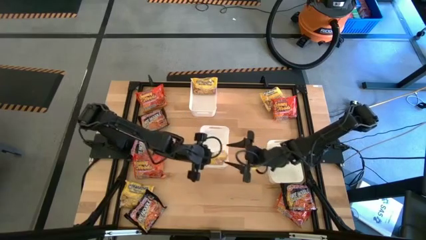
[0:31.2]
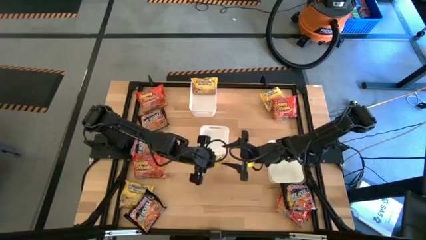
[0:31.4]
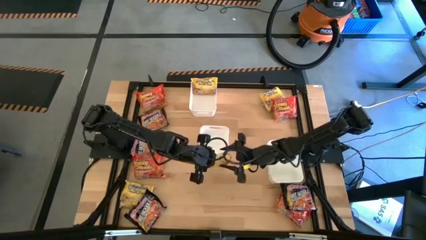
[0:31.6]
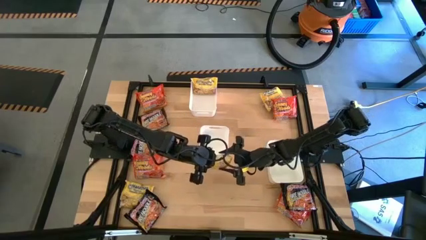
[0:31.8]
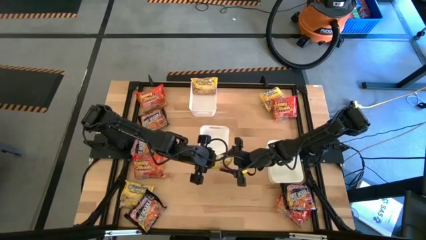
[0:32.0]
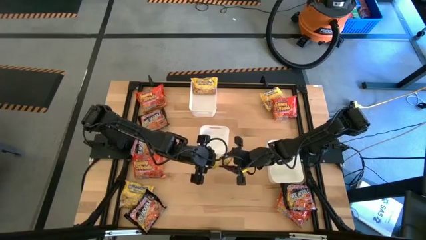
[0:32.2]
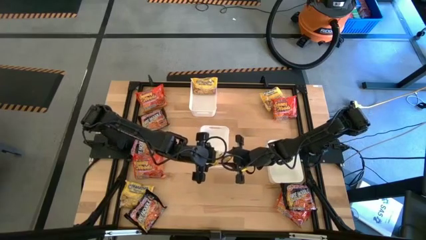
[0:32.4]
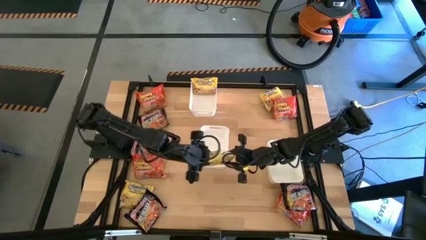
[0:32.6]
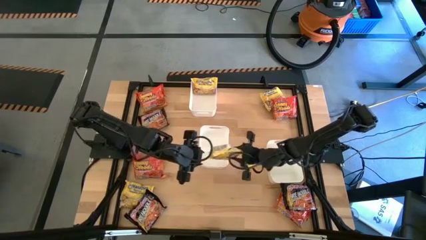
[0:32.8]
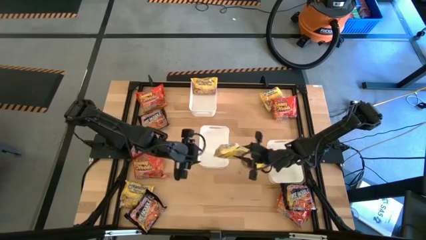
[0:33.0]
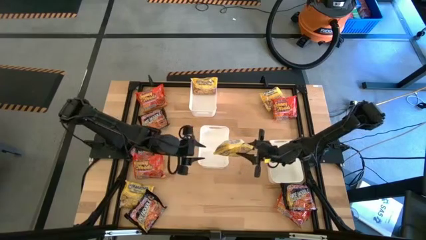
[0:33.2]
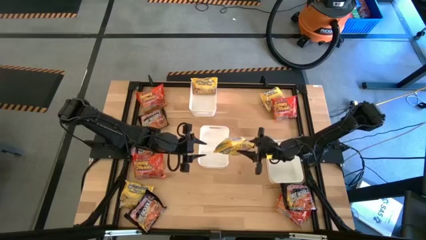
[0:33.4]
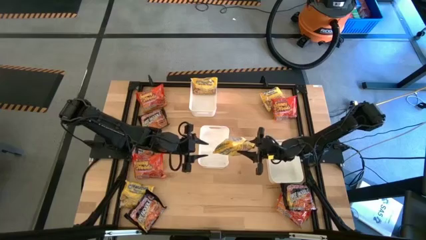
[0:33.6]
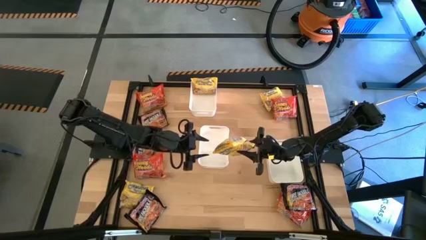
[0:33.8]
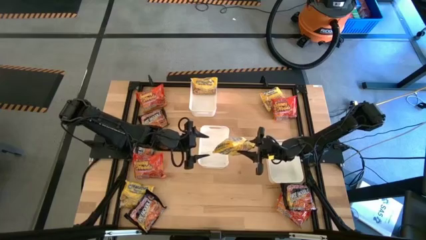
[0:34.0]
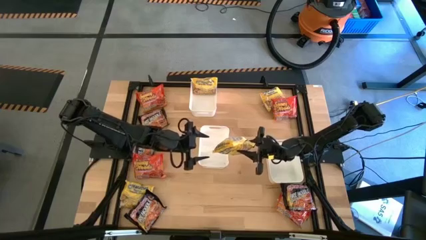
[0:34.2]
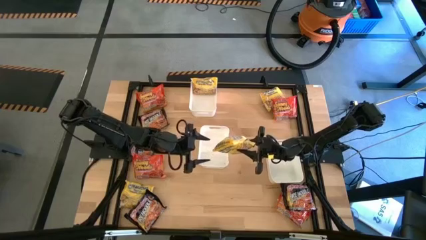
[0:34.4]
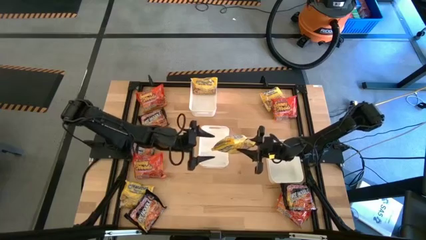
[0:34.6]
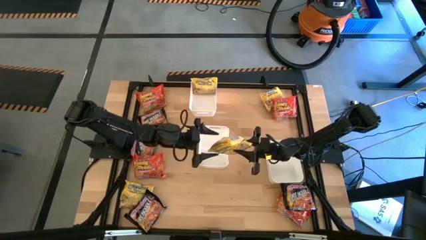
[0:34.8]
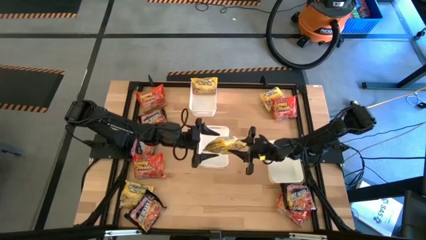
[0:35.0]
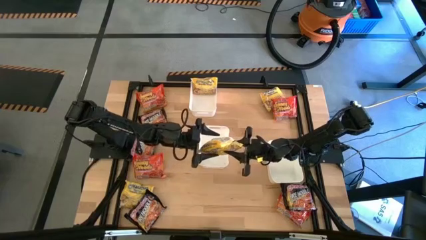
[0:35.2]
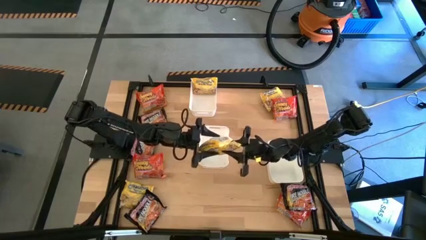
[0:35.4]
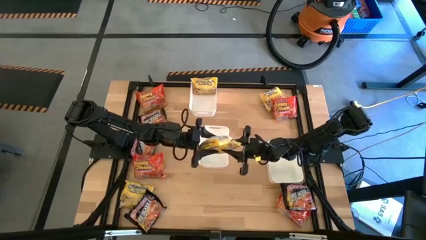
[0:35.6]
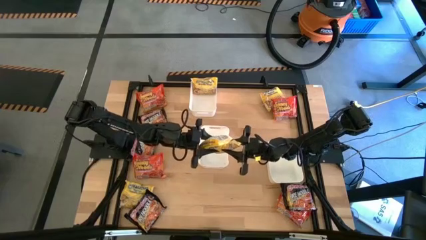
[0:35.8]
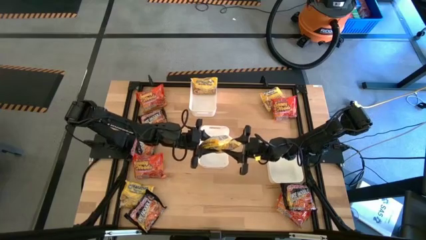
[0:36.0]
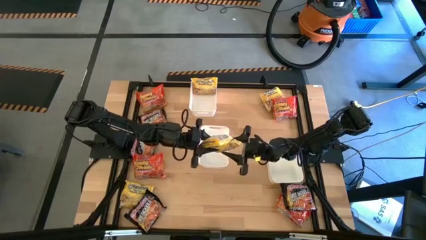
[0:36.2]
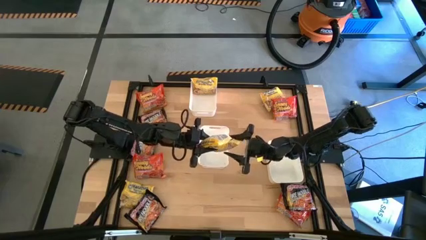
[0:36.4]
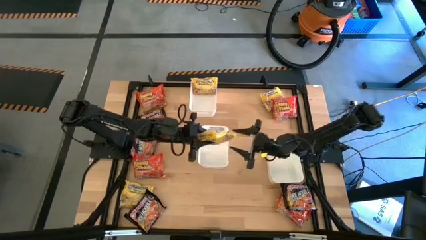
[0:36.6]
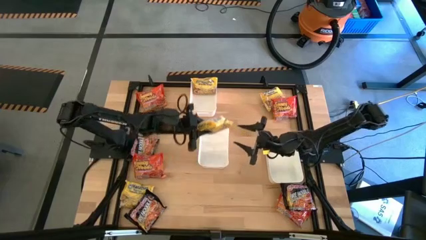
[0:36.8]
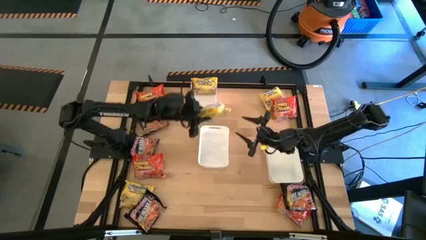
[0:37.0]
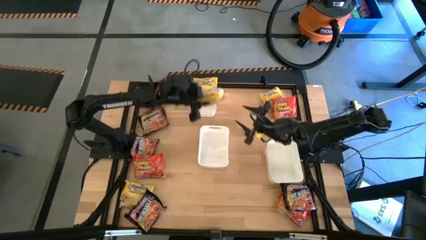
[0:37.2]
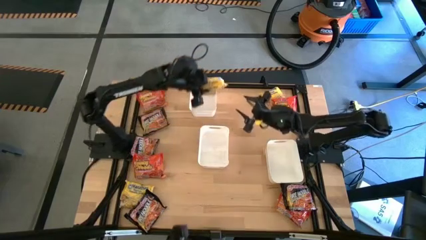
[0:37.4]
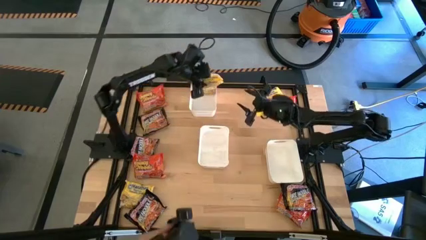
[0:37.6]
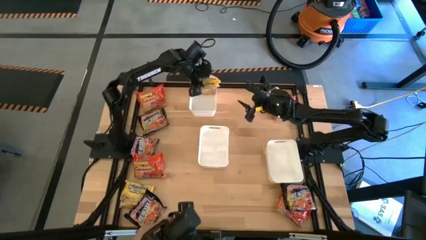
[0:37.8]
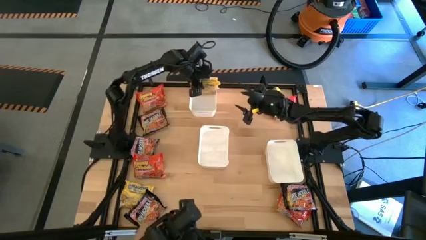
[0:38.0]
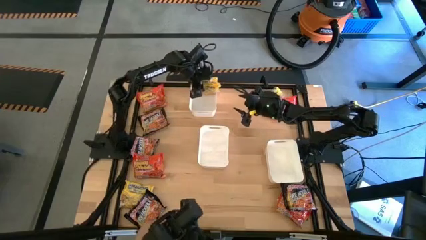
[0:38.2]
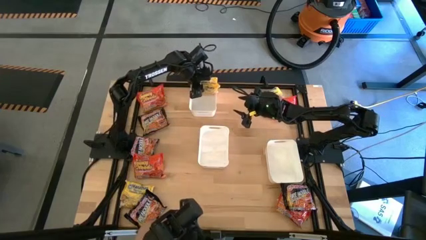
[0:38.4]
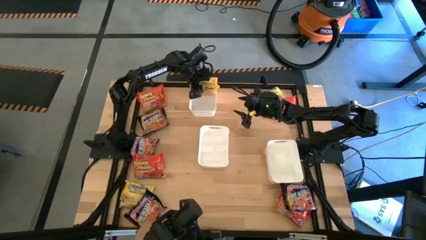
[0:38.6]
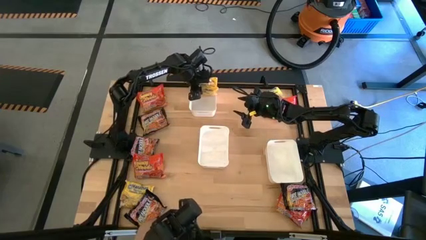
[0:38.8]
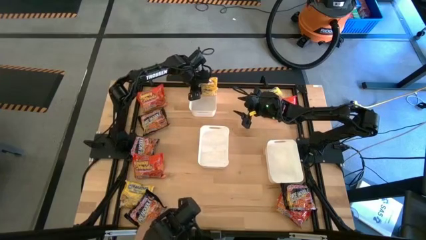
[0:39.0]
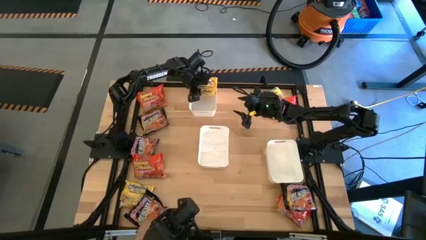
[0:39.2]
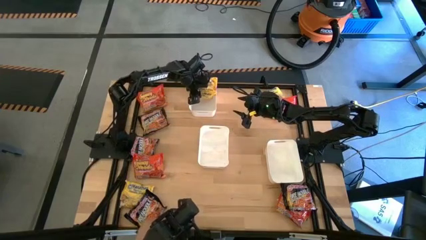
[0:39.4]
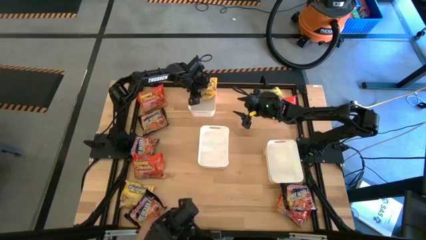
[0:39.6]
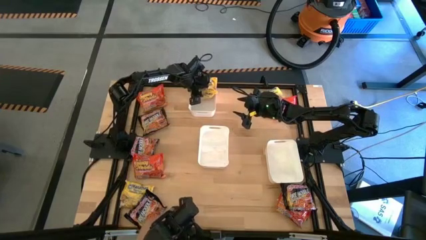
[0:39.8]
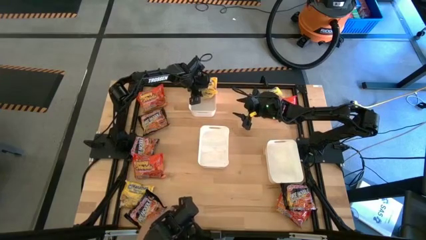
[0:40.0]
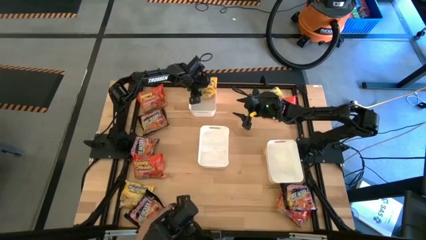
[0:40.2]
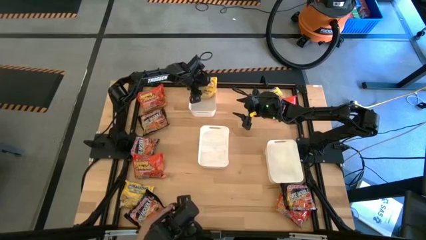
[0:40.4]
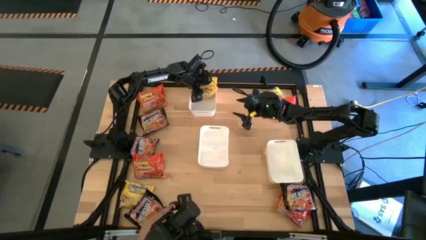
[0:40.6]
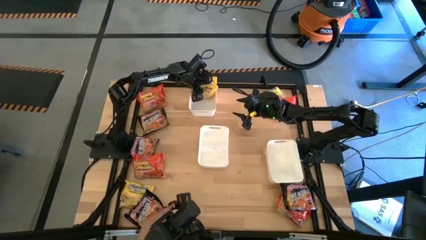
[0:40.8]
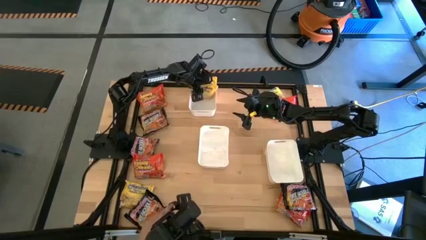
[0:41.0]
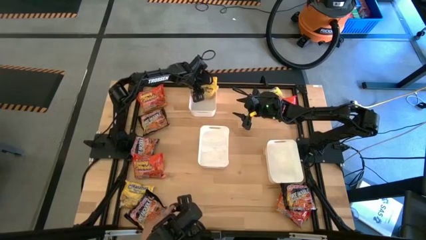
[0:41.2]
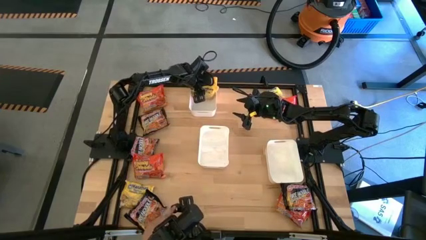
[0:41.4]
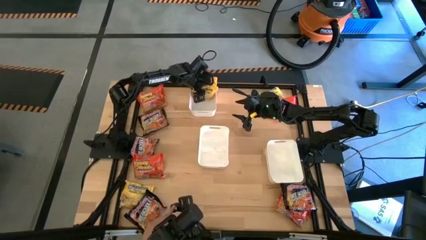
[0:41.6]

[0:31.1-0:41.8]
Task: Sort Maruchan noodles
Put the yellow noodle pack into the top white bin
